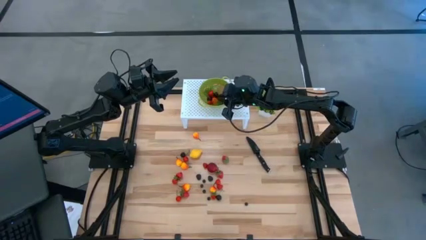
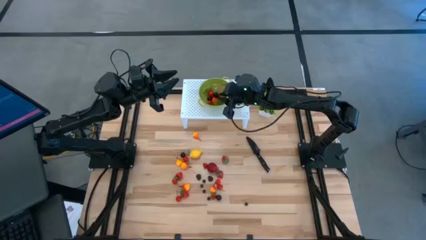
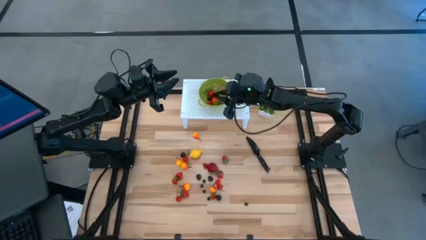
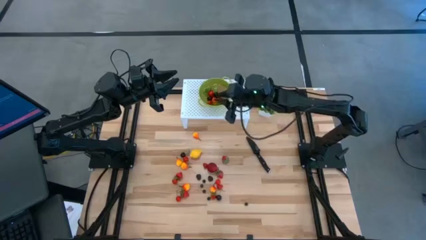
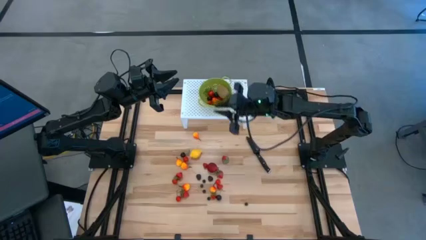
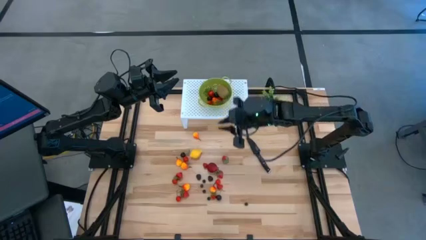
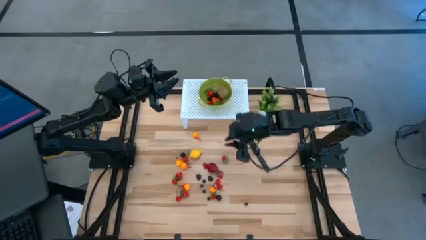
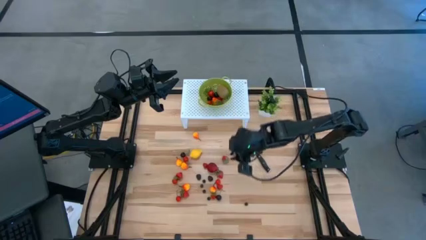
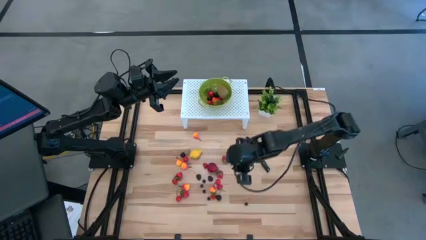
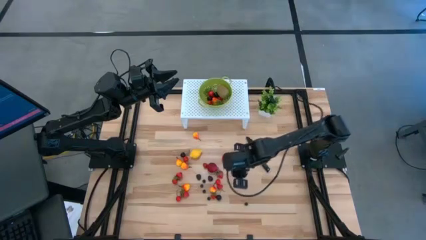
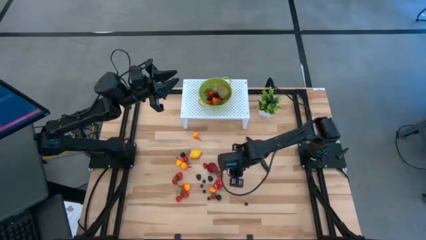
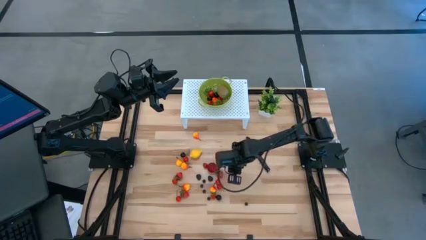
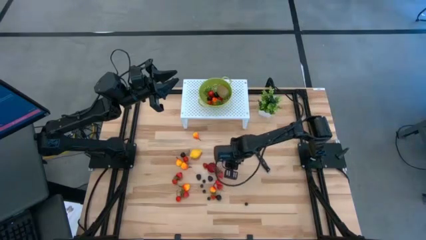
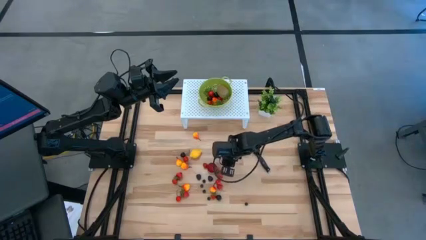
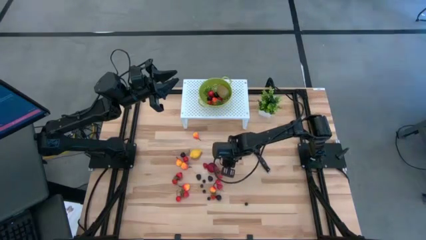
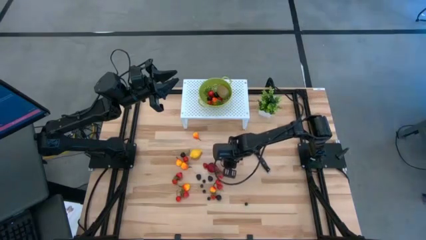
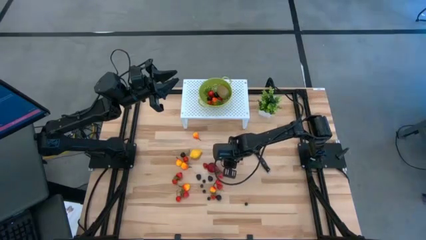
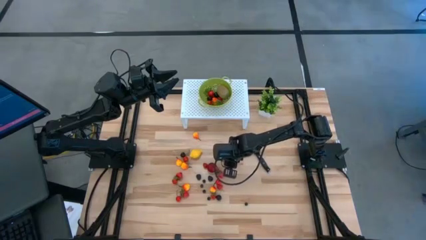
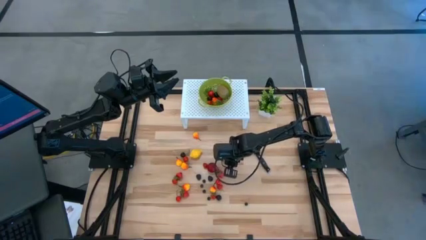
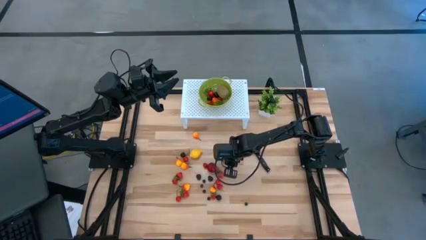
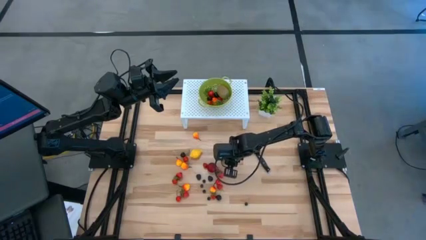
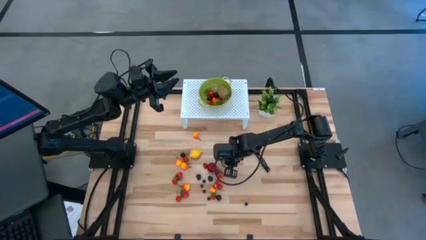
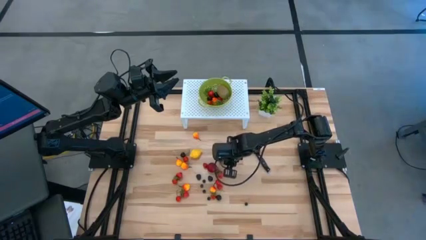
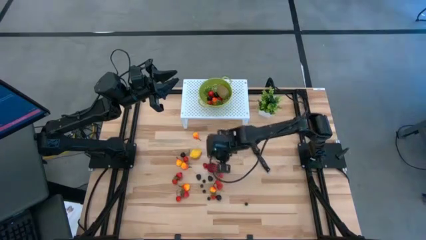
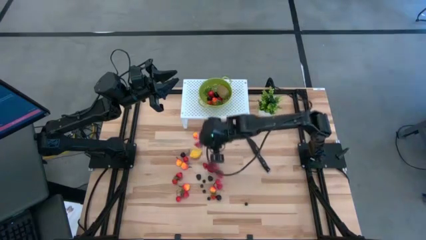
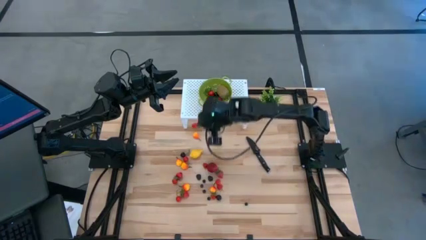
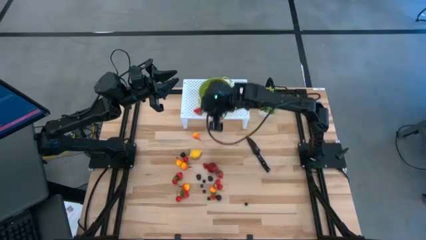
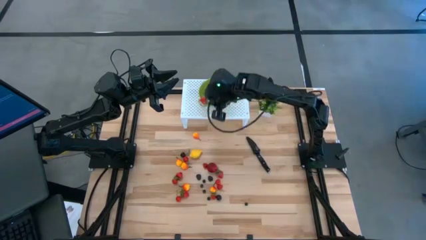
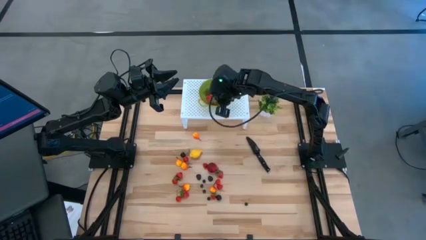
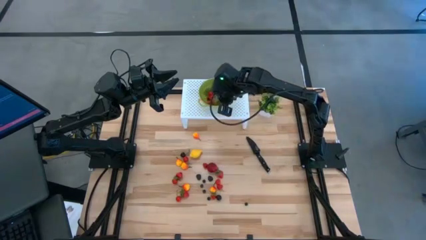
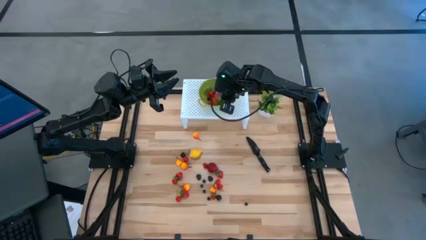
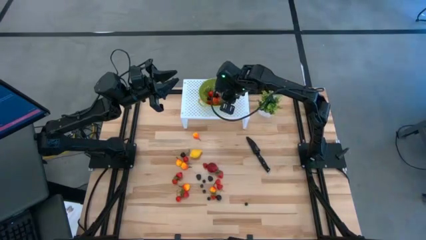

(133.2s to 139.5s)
Task: Pick & Place Fruit
Put the red strawberry into the green strainer bowl

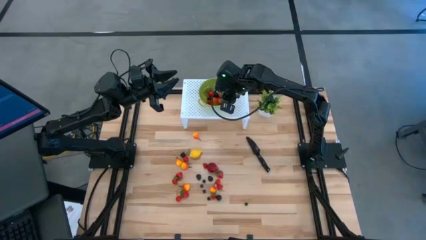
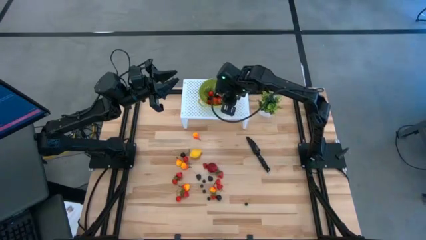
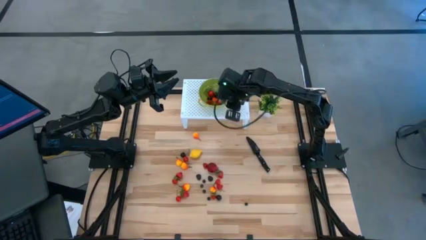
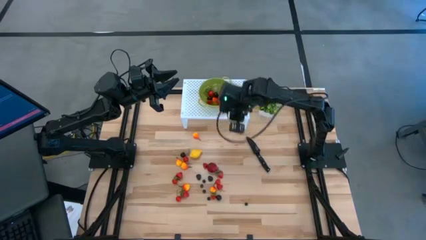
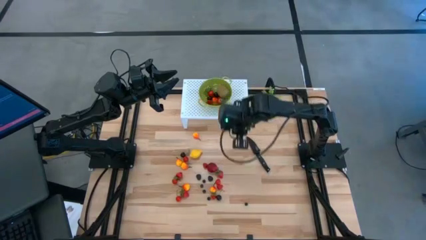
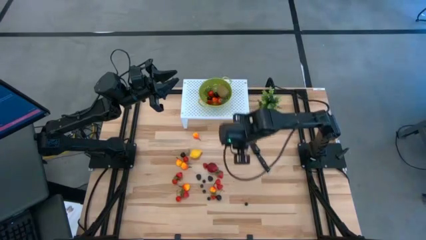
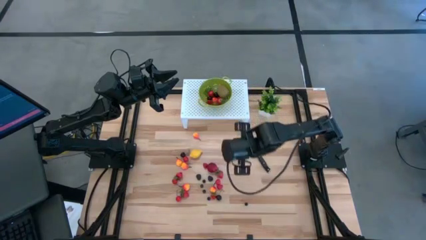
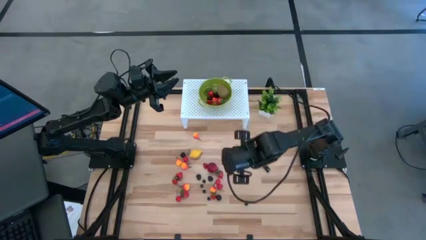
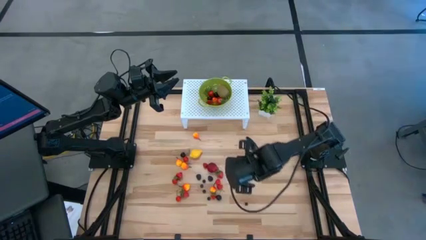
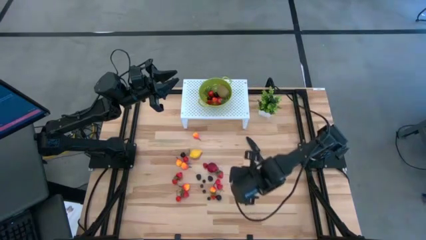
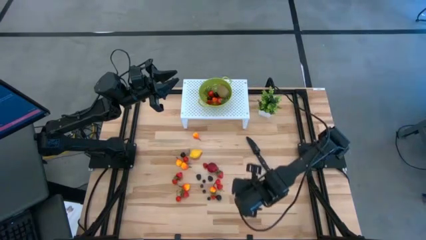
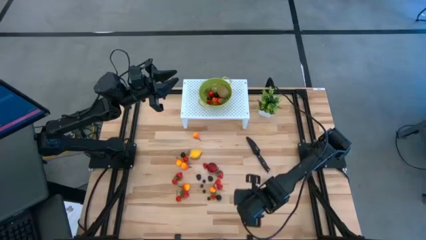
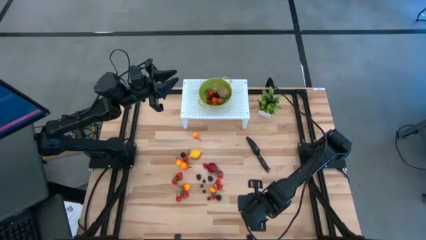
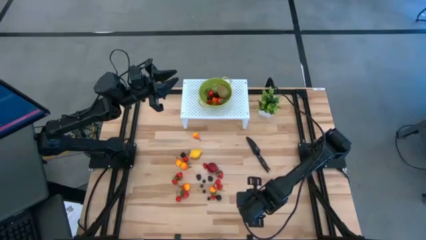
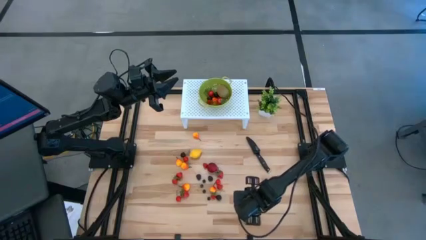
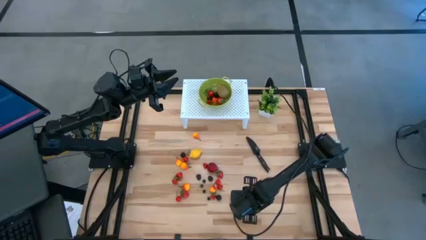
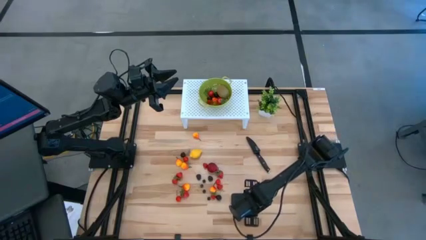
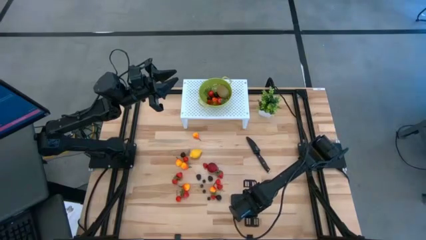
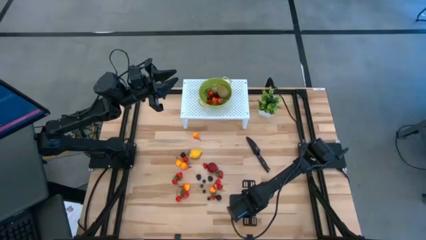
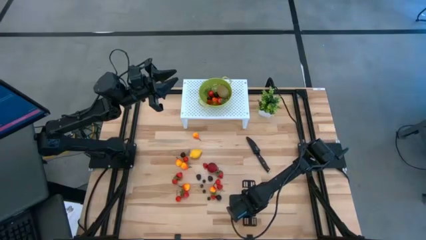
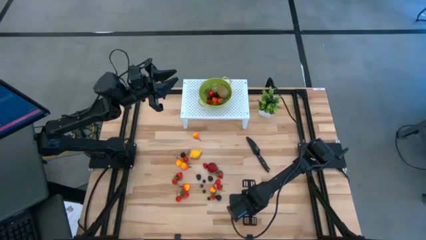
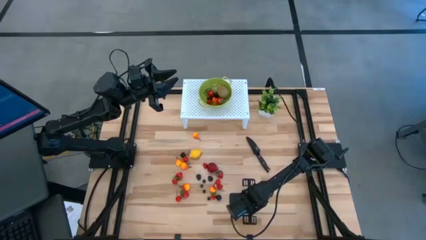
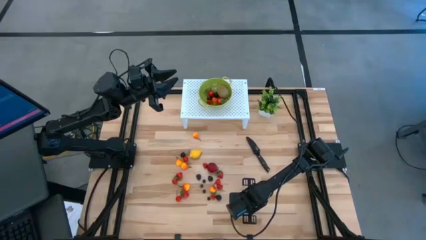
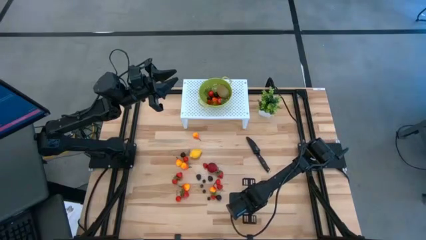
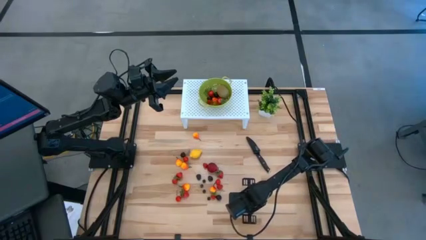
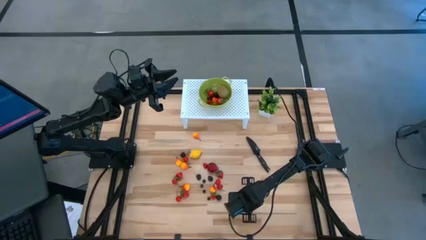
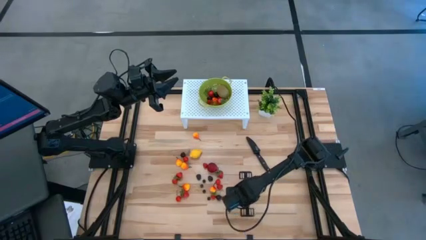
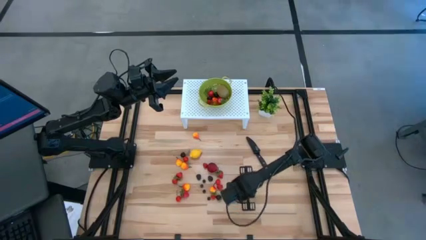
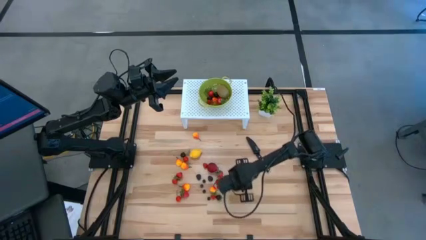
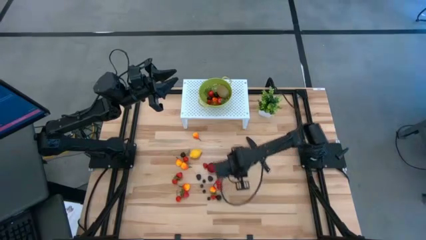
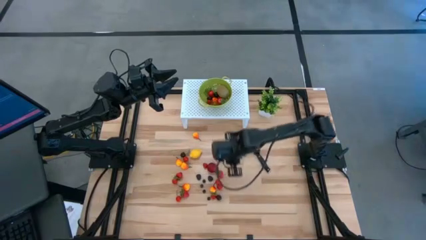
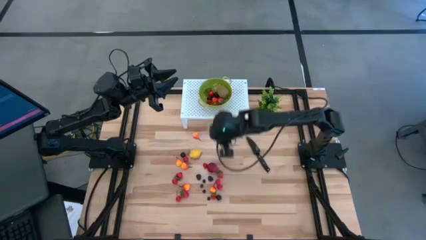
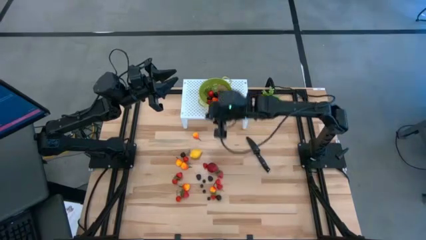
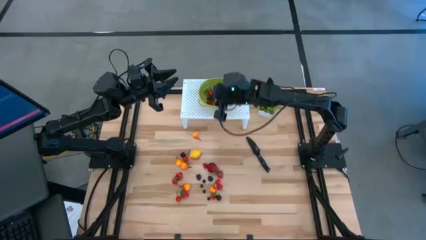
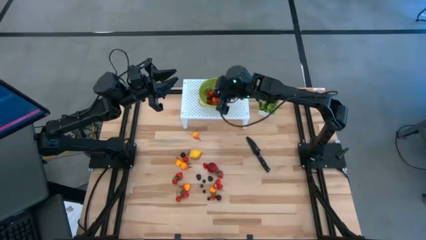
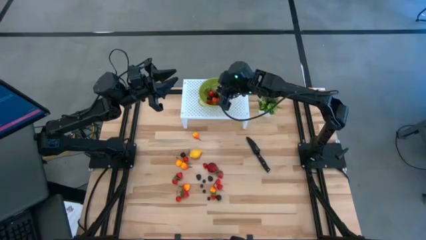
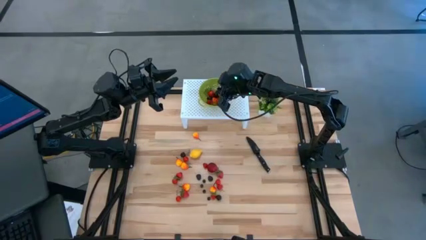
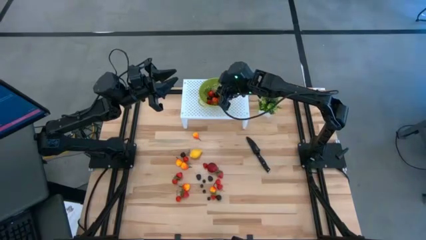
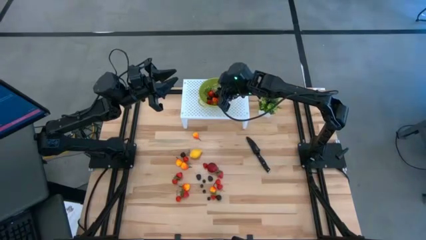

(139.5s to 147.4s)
Put the black blueberry into the green strainer bowl

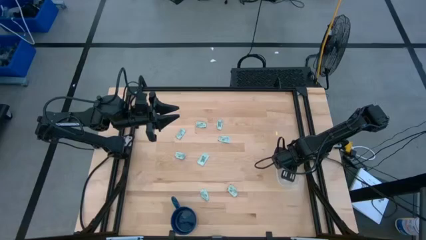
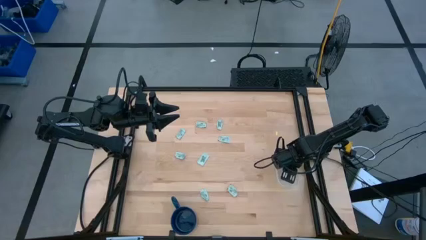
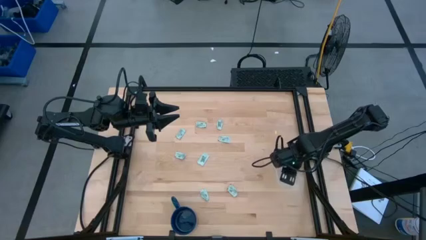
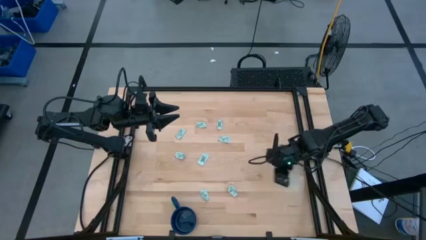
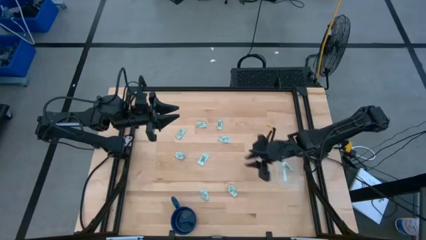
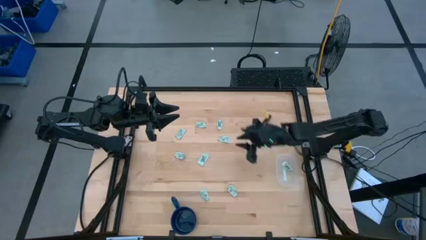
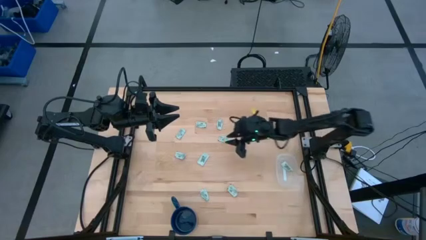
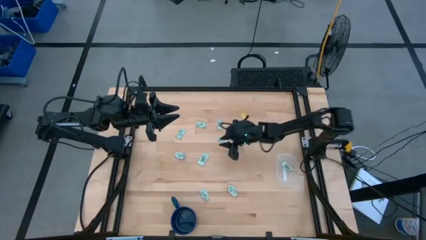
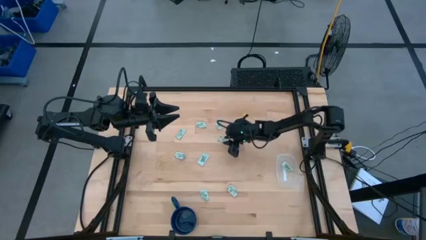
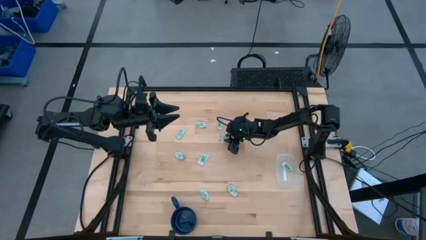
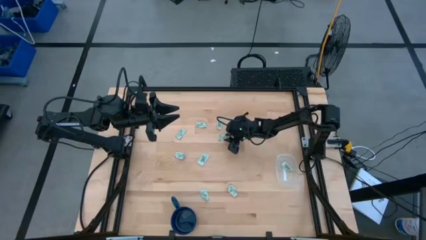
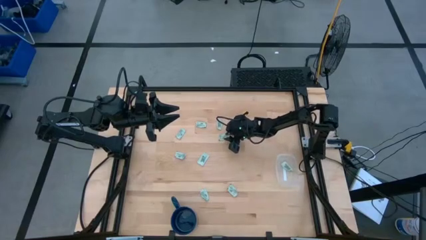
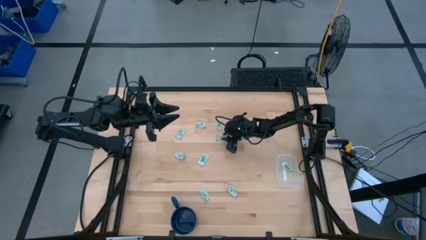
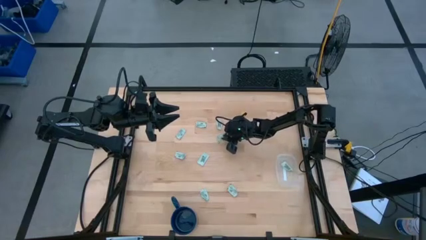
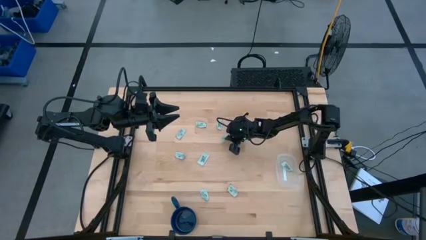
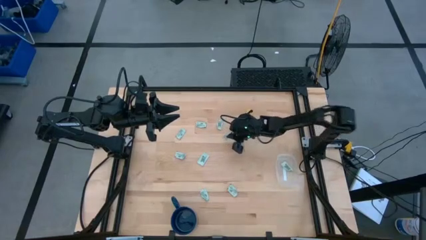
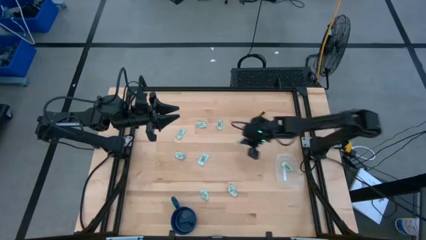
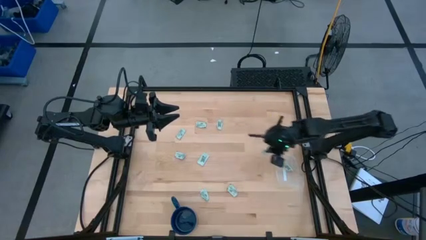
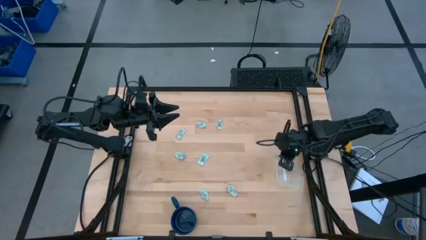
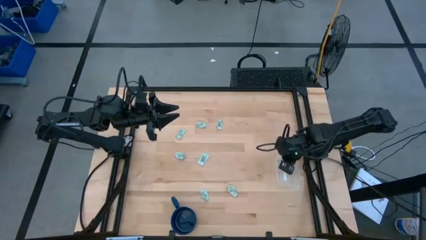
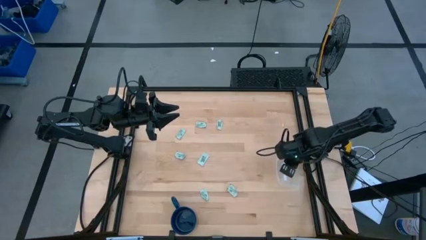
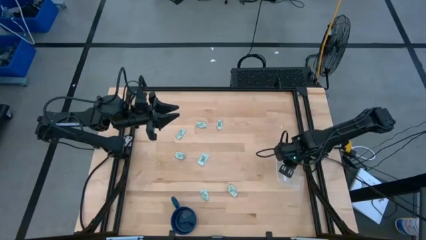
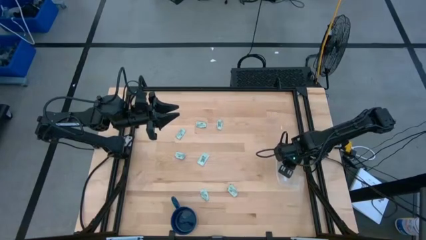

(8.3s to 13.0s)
Task: Pick and place Stevia / Truvia into bins
Put the green stevia packet into the transparent container
